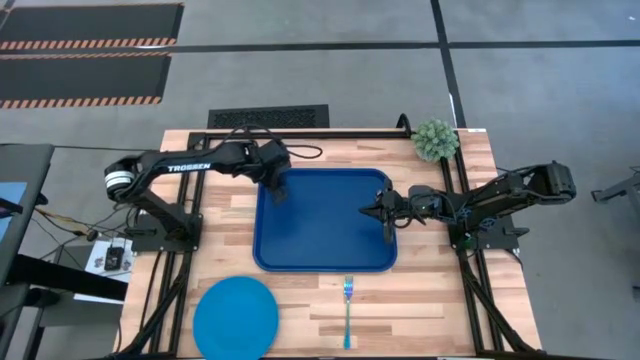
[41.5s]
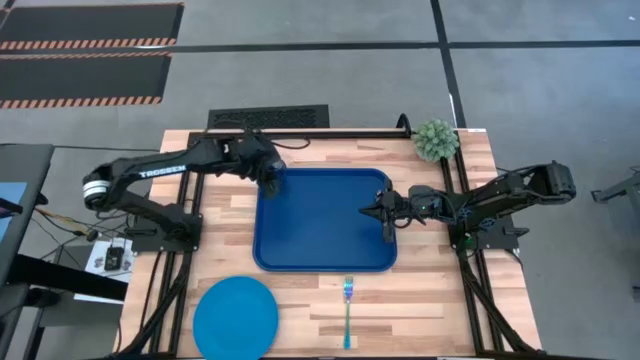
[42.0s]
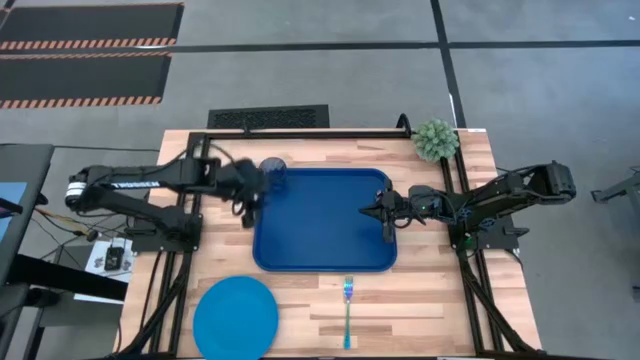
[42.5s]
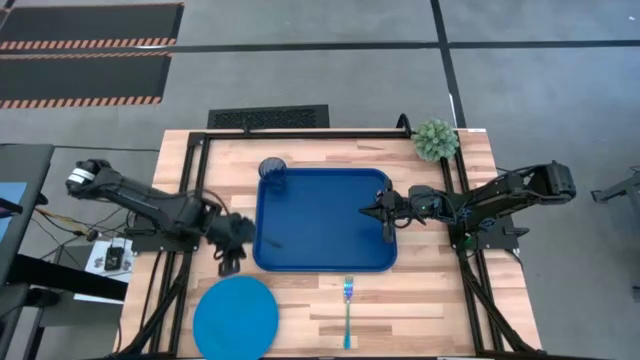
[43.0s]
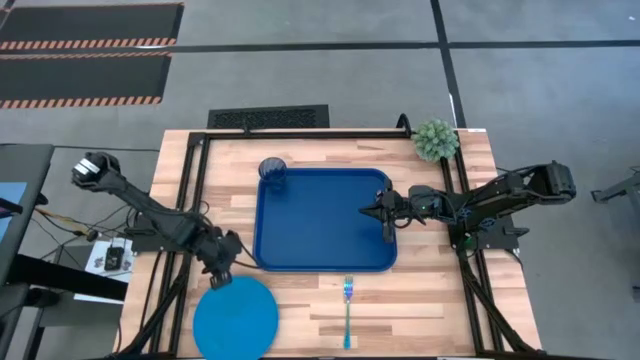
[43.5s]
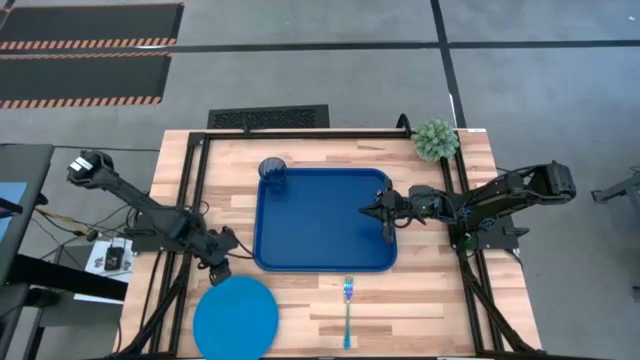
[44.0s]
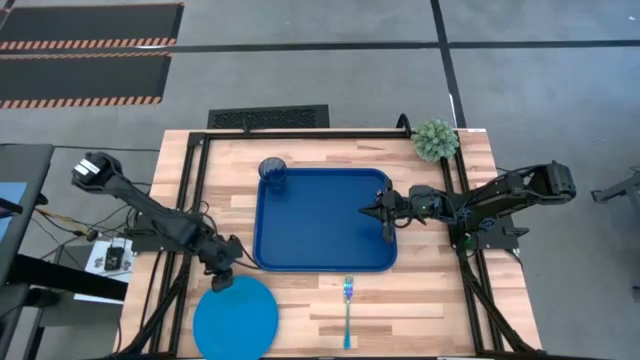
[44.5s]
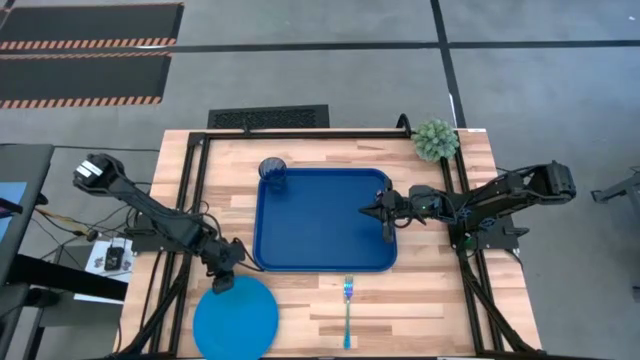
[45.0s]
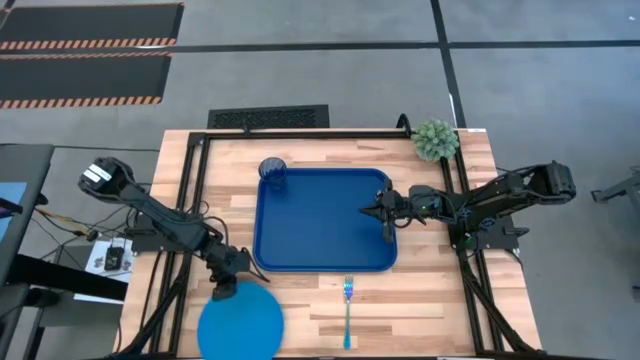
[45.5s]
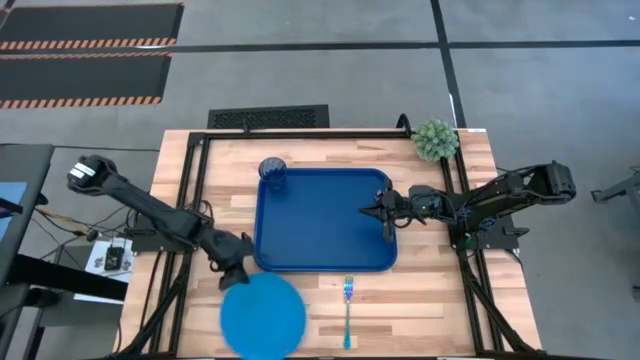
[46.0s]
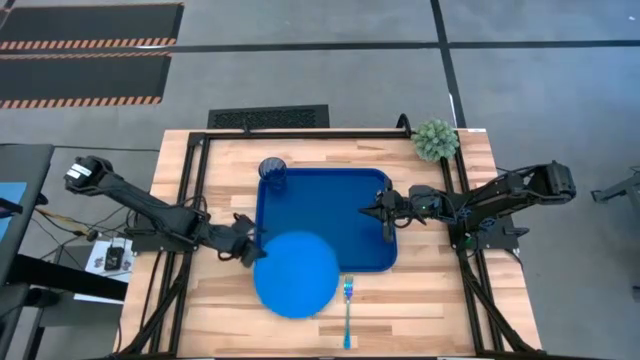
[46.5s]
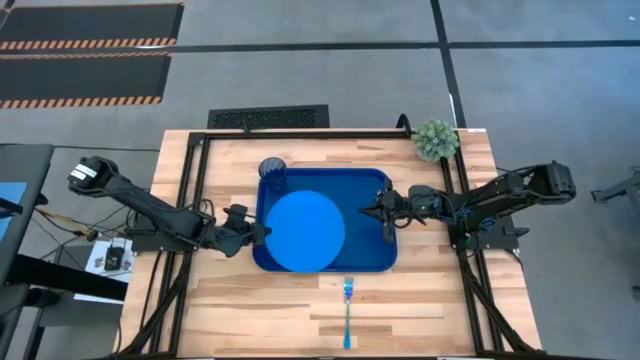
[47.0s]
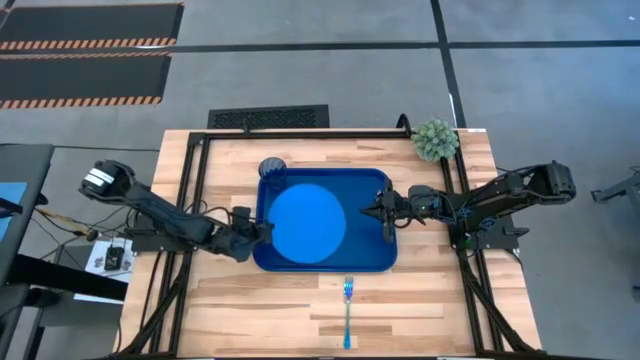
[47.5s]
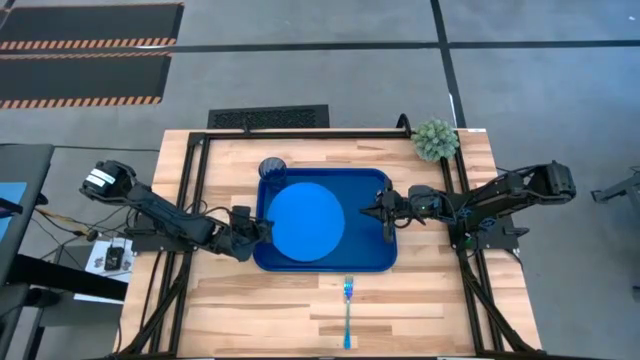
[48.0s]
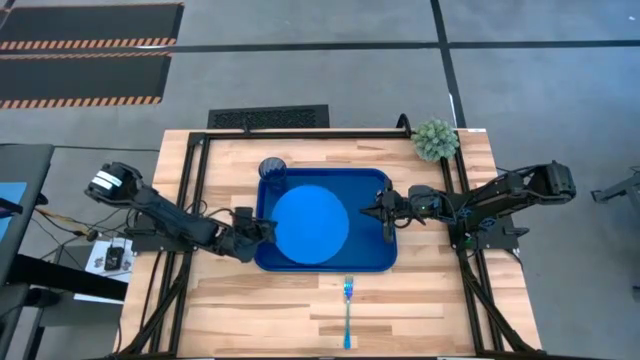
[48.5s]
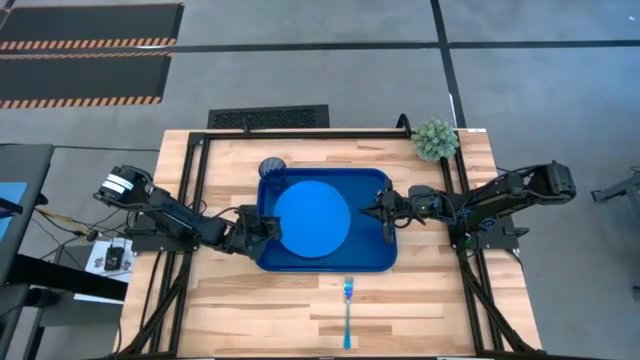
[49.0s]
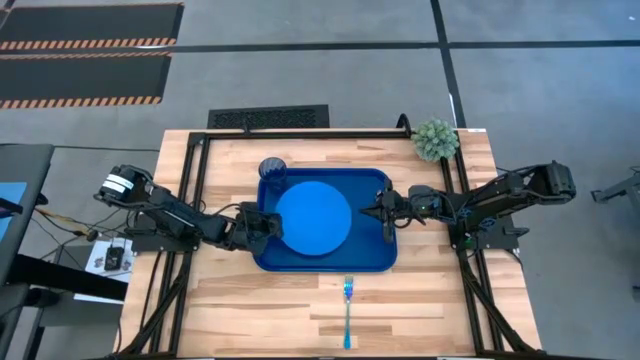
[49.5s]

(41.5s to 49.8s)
Task: Pick and place plate/cup/fork/spoon on tray
Put the blue plate at the bottom of the blue cup on the blue serving tray

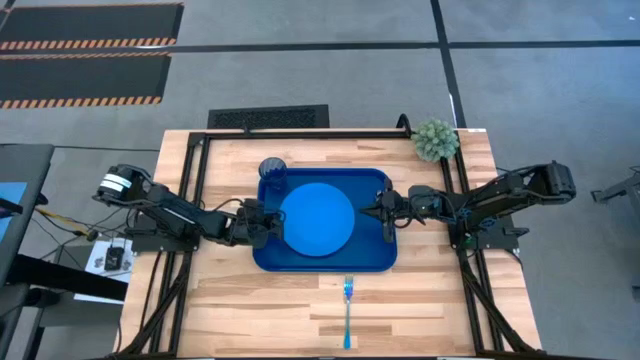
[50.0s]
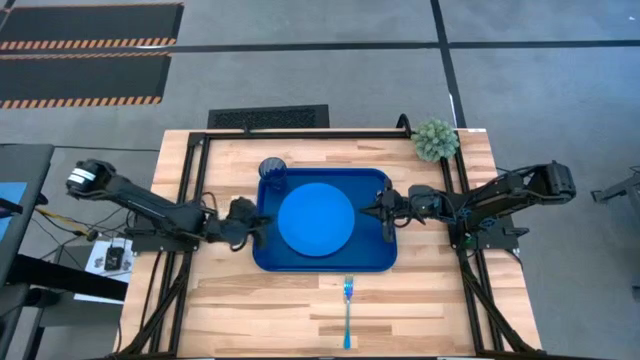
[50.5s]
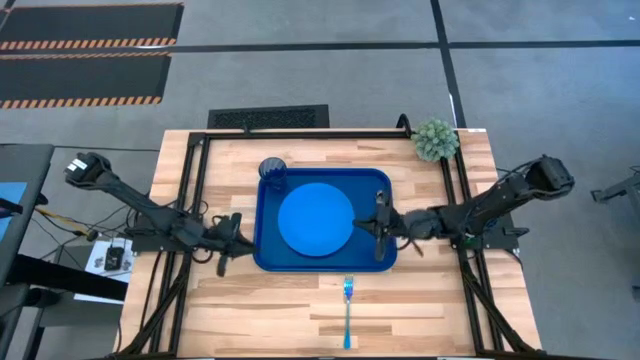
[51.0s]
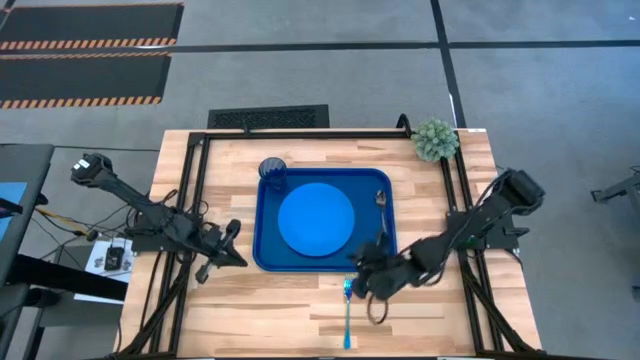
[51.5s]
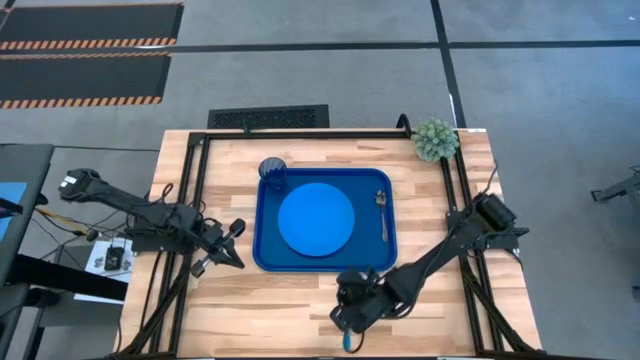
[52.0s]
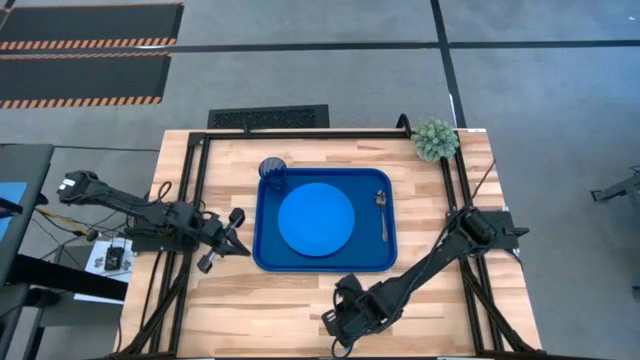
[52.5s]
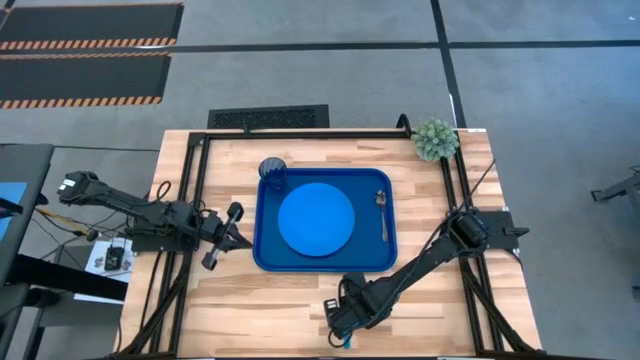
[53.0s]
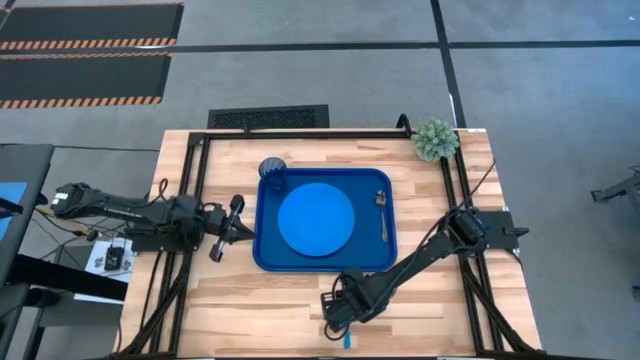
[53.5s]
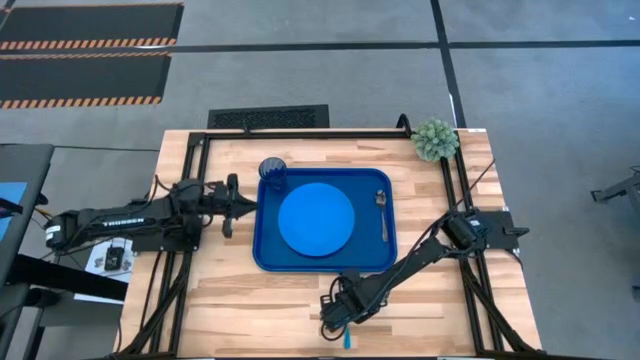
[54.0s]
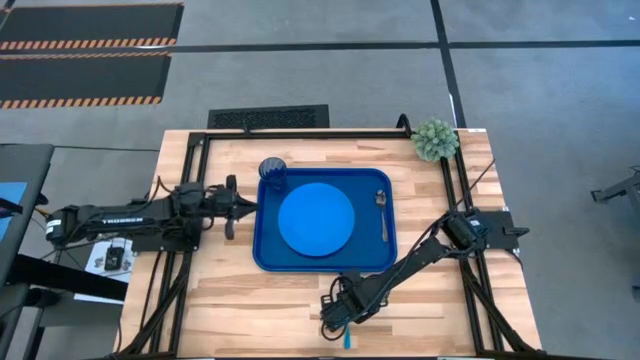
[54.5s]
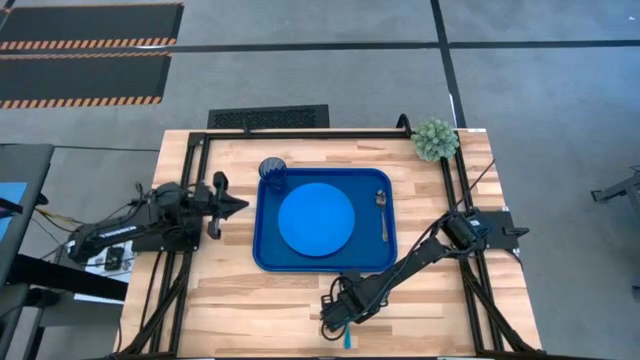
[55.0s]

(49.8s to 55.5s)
Put the blue fork between the black spoon and the blue plate on the blue serving tray

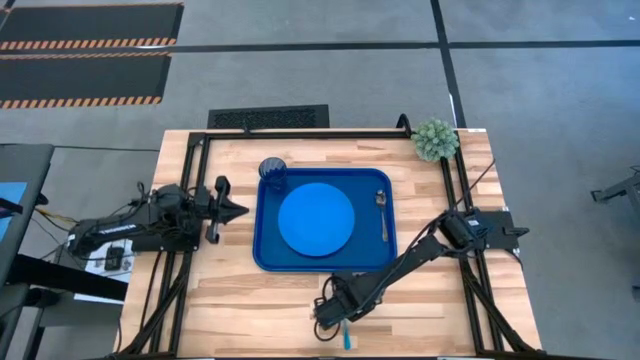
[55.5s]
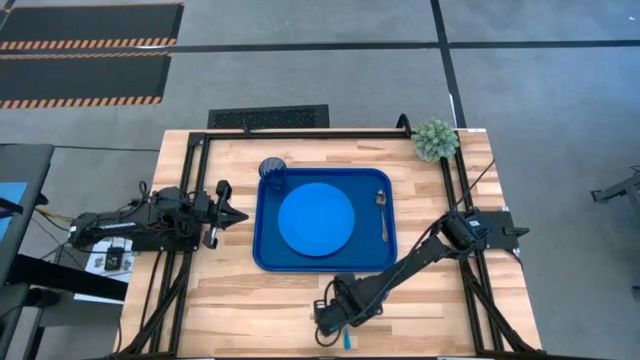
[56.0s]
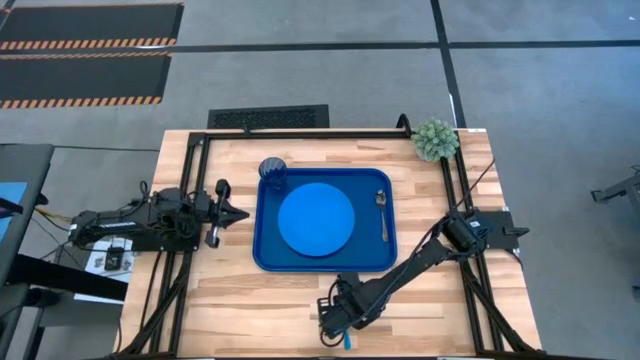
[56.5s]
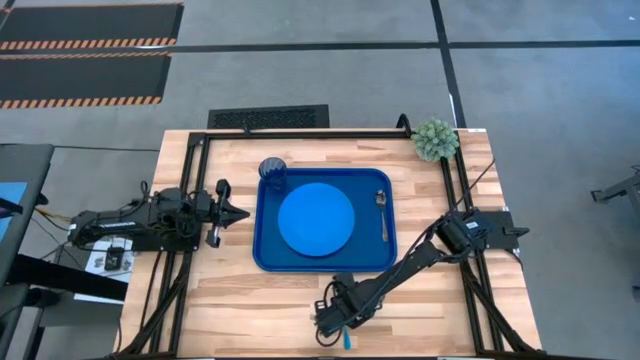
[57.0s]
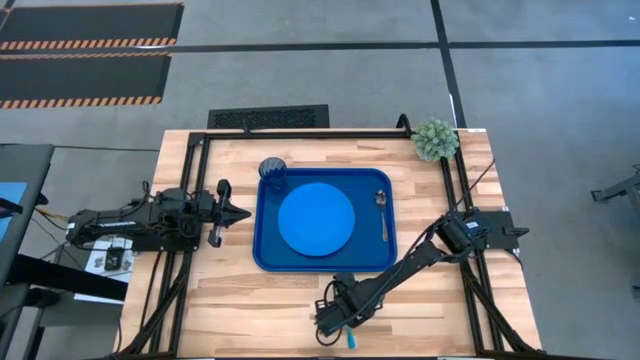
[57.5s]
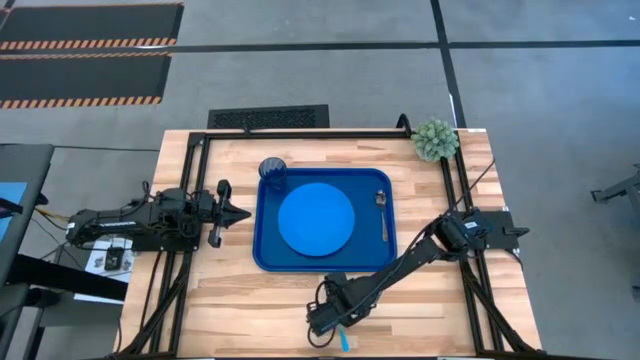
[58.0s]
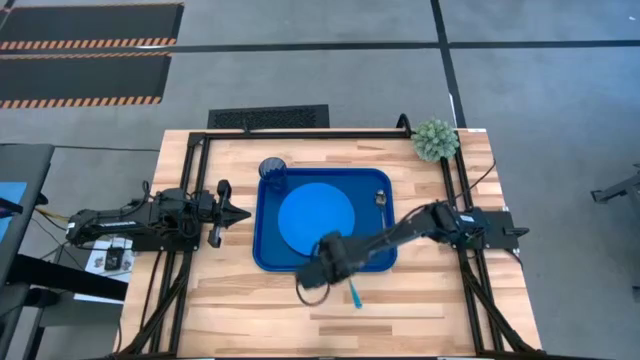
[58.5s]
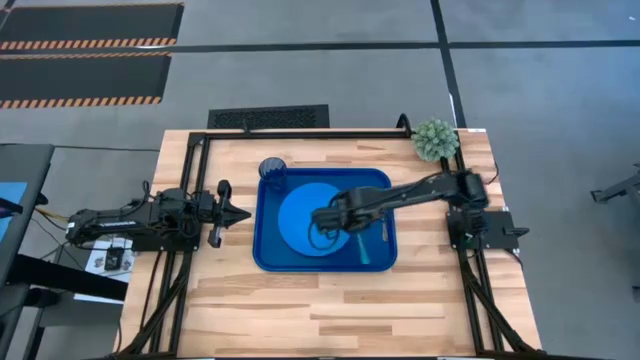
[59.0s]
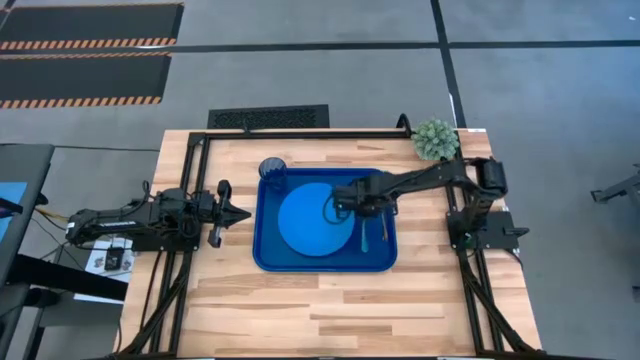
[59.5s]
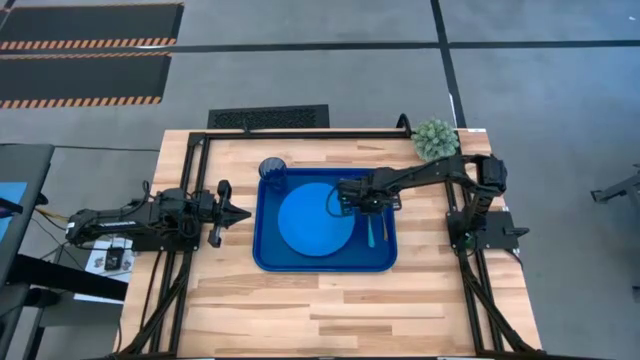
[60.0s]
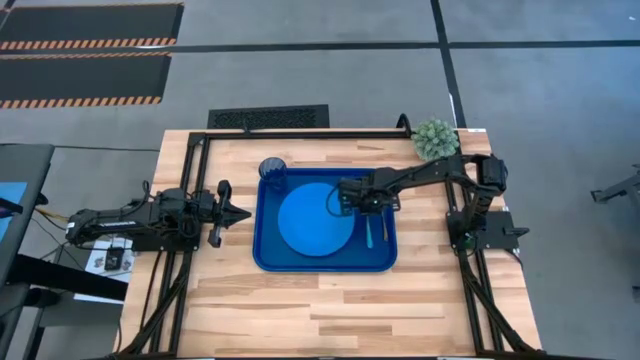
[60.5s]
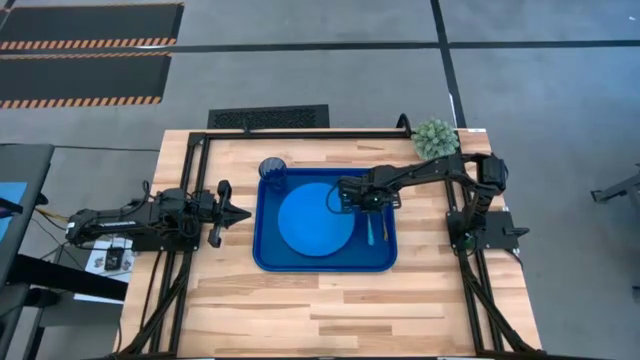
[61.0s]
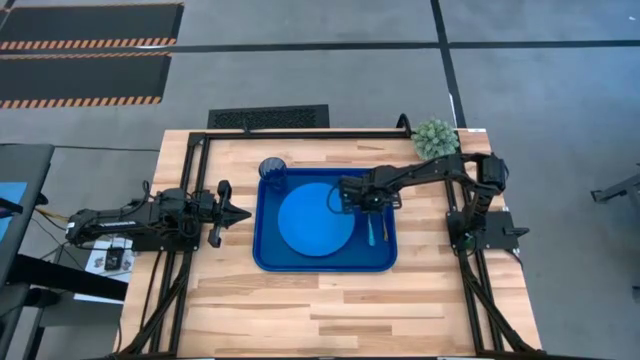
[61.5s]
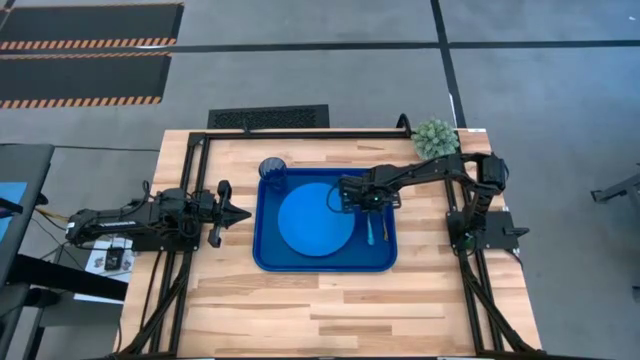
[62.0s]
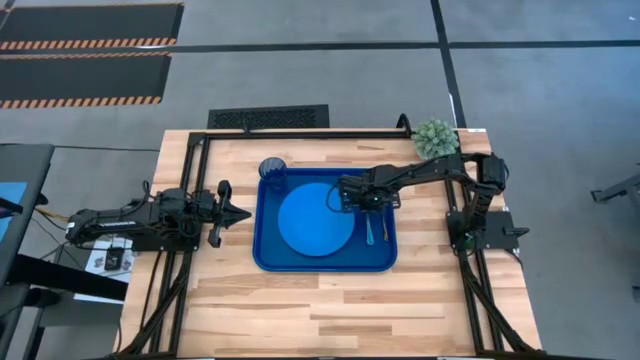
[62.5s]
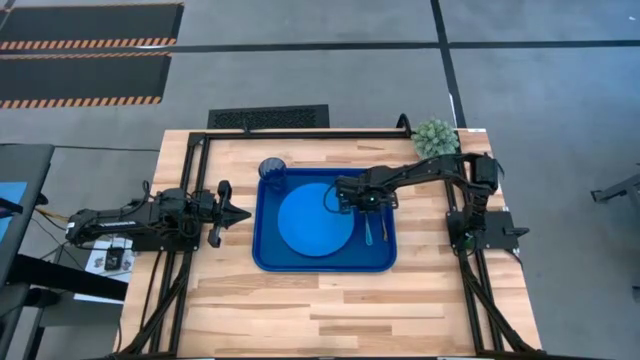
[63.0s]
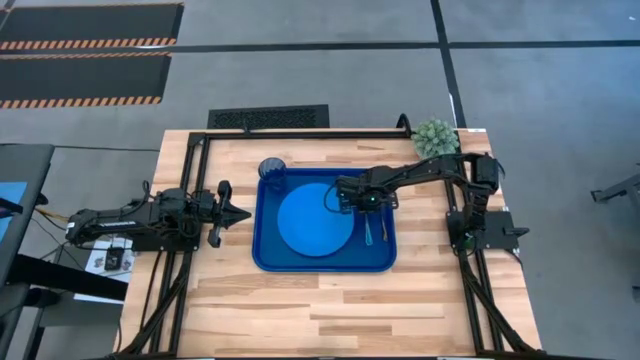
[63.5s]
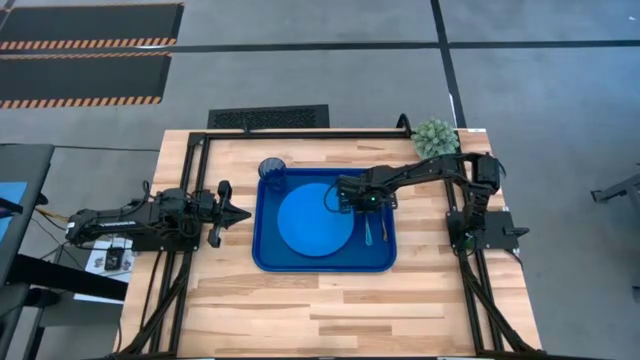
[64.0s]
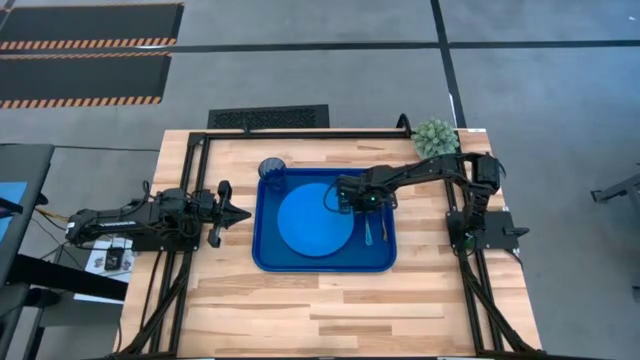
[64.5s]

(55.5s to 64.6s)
Put the blue fork between the black spoon and the blue plate on the blue serving tray
